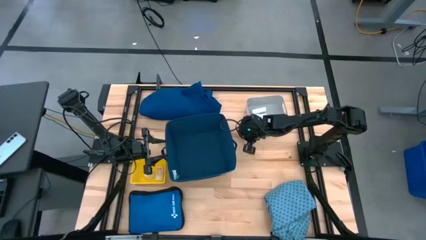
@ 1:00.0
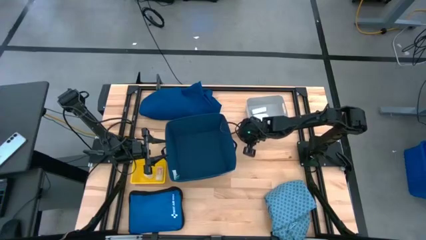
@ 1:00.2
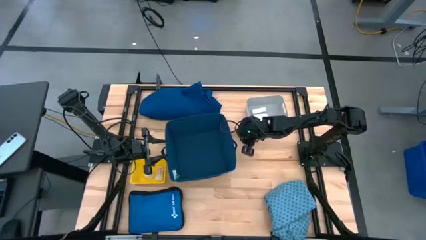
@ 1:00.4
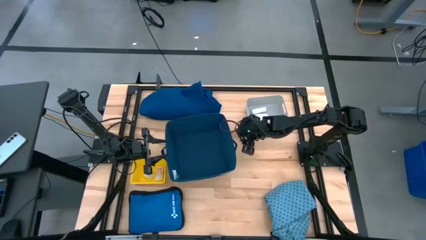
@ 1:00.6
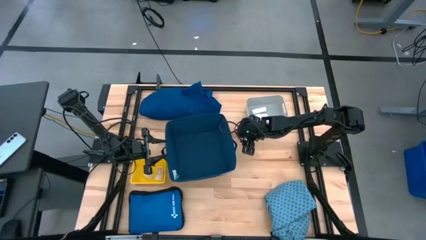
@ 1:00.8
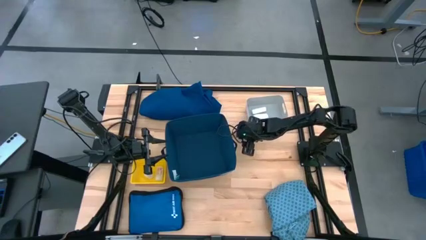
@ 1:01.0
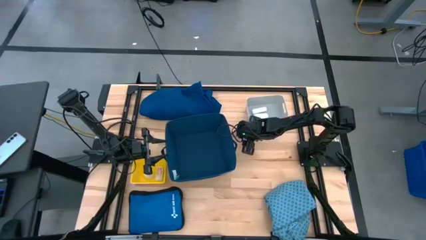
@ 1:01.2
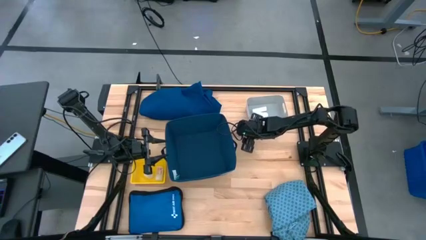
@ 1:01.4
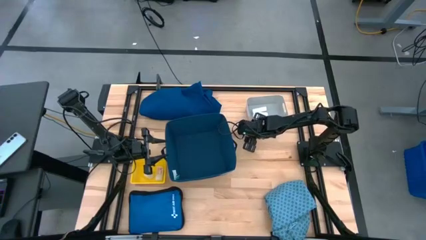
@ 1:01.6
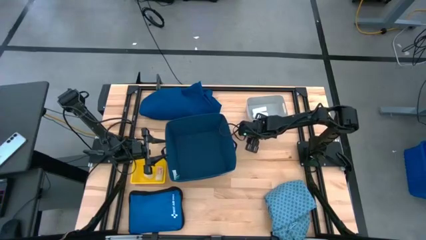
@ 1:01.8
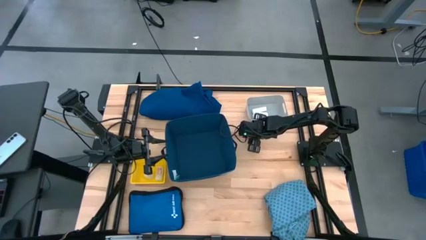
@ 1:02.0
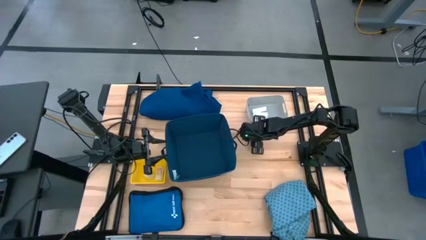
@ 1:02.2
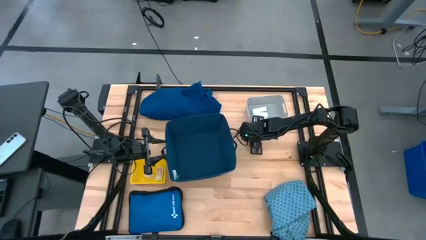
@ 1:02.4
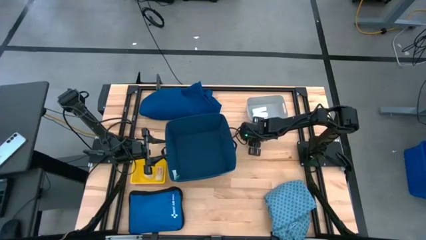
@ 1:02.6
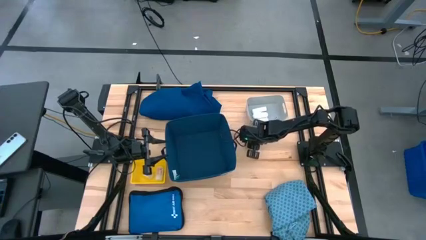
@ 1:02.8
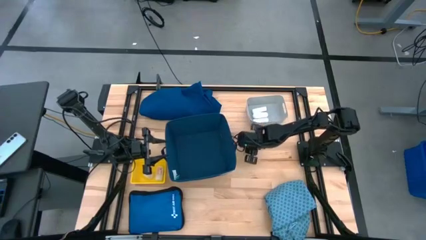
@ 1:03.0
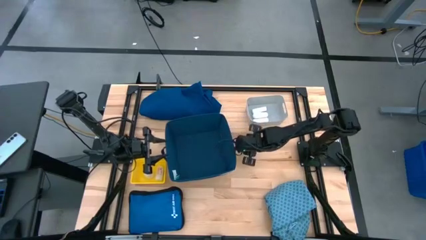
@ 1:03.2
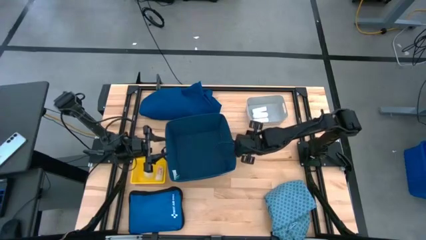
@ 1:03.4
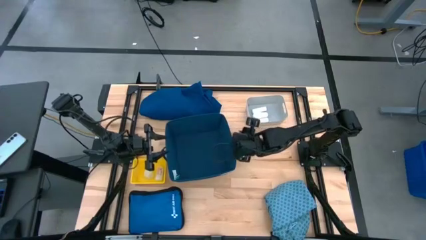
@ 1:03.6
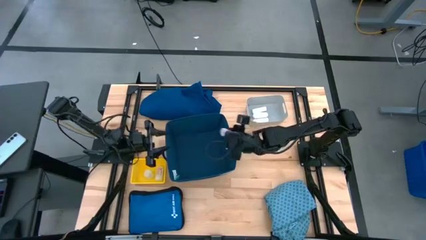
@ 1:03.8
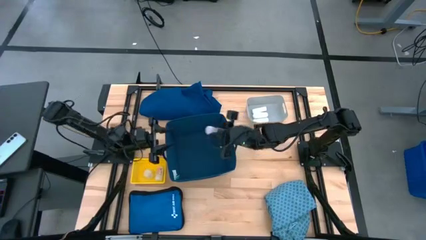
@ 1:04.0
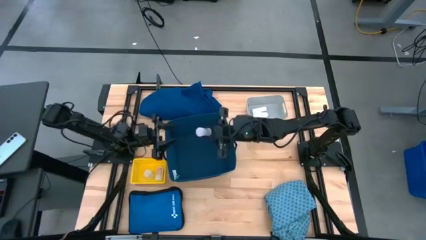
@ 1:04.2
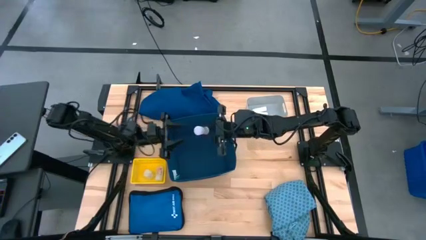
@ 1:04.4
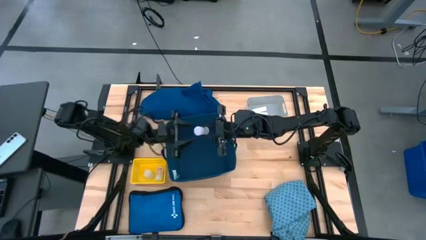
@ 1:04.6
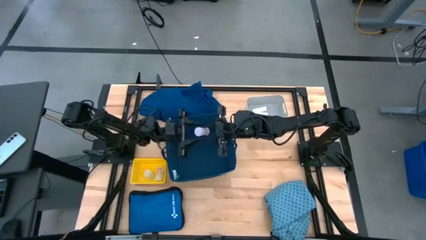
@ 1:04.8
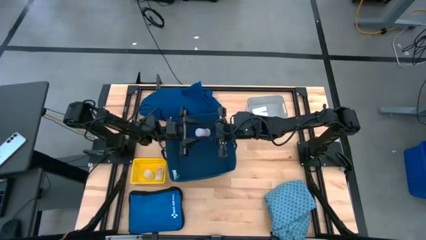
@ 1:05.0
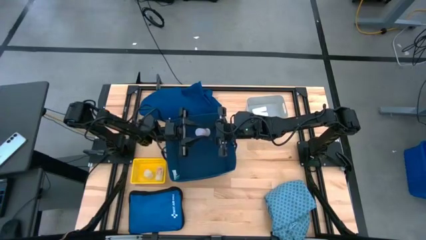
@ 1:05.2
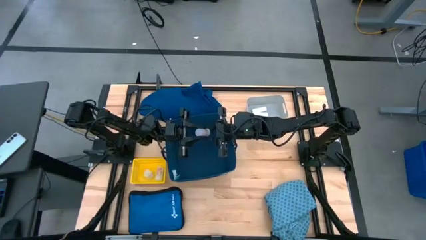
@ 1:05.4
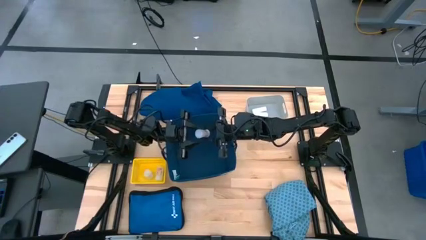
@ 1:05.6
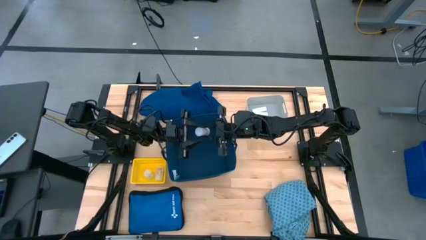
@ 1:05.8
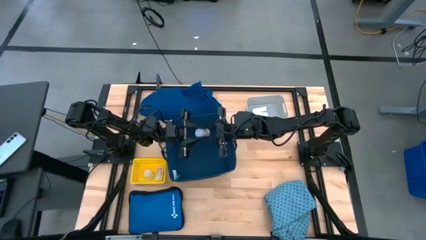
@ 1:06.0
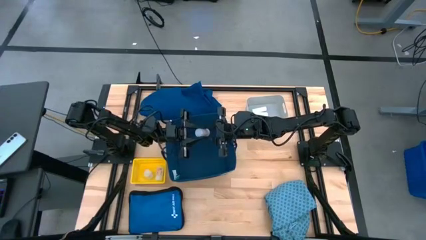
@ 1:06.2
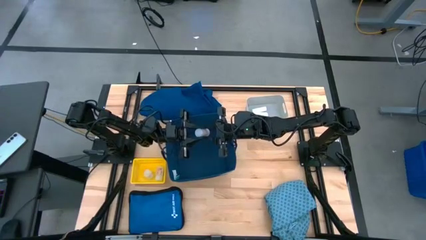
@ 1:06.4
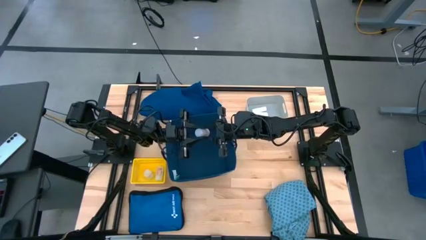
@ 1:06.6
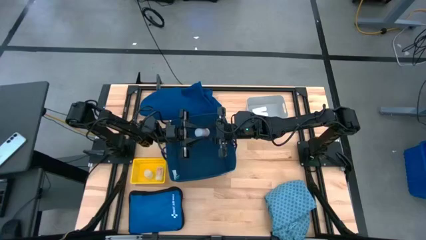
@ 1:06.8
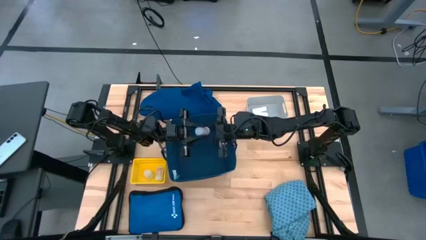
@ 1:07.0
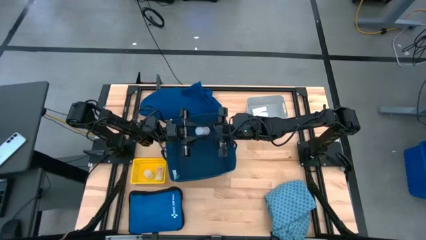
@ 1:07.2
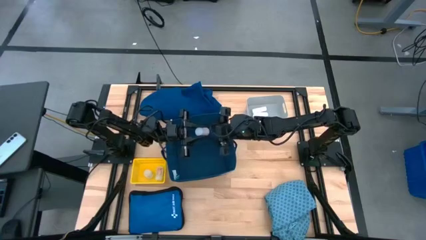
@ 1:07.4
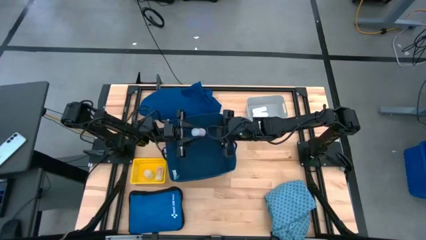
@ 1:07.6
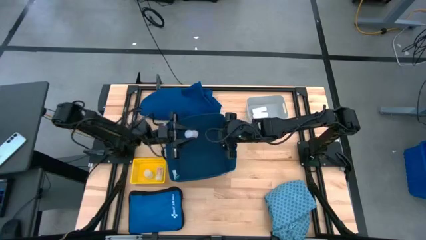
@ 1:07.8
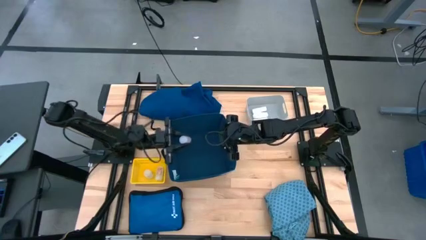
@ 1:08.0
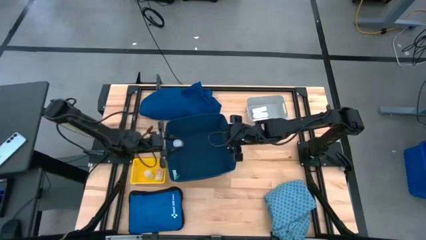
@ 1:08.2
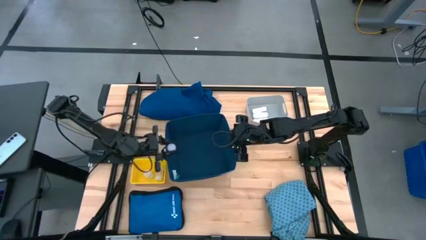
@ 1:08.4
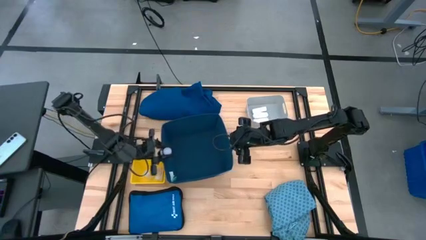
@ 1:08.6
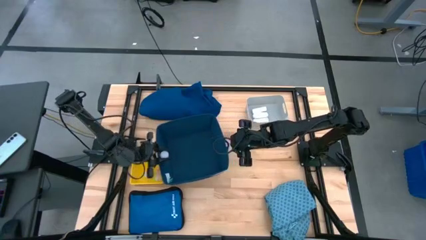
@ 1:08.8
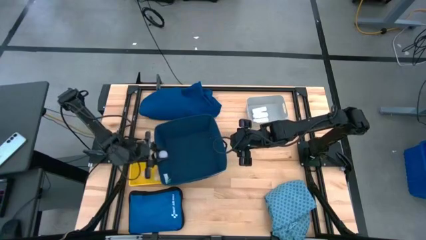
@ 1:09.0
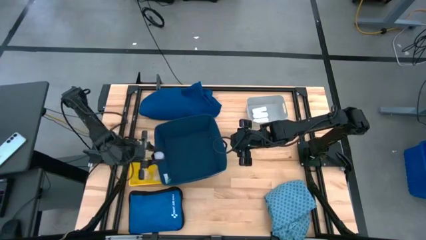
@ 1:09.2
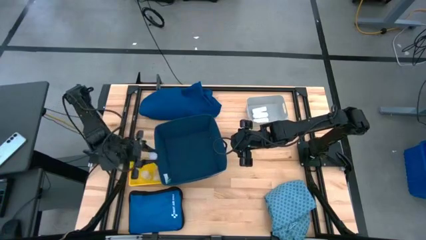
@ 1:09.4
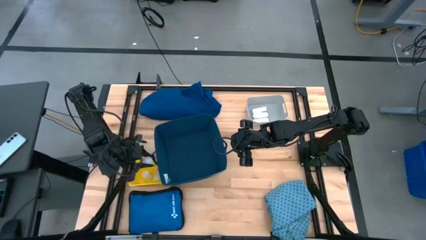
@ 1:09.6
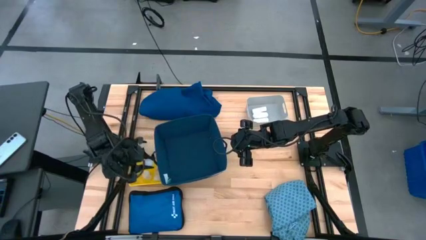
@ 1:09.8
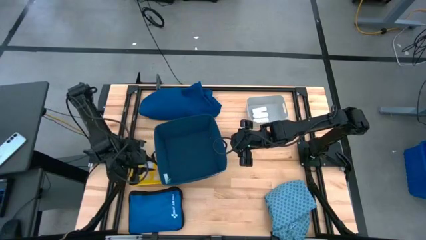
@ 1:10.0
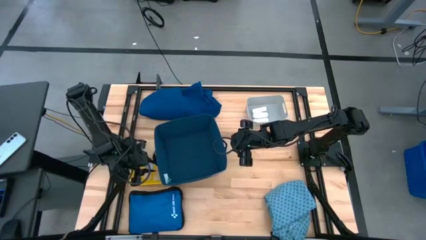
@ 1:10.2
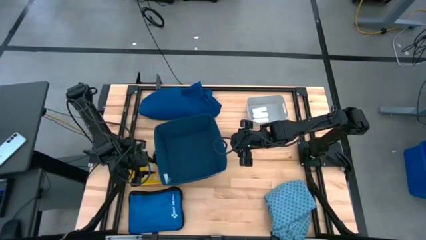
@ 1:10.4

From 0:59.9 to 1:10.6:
Task: Pick & place medical supplies in basket/bin
Put the white medicine bottle into the yellow bin

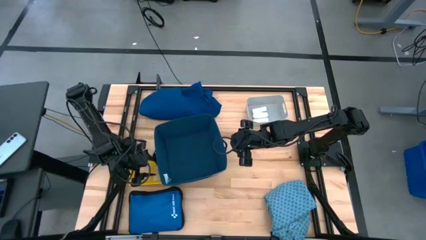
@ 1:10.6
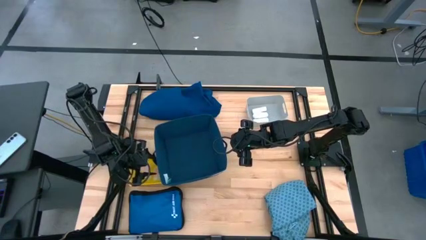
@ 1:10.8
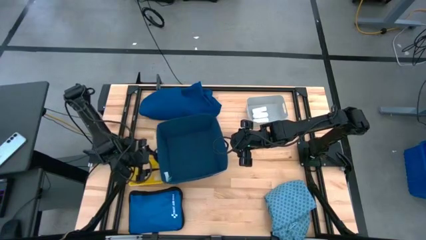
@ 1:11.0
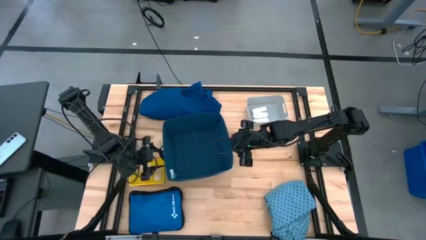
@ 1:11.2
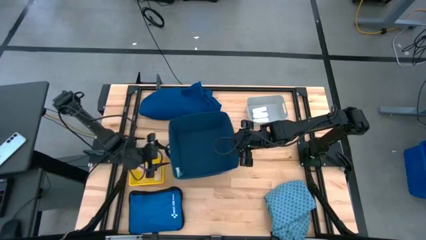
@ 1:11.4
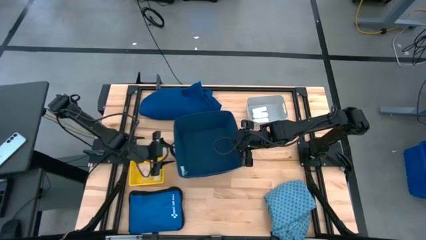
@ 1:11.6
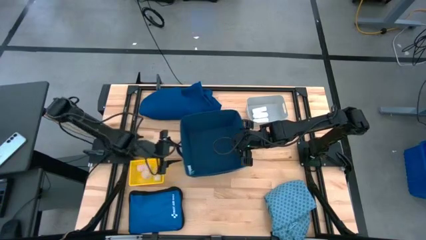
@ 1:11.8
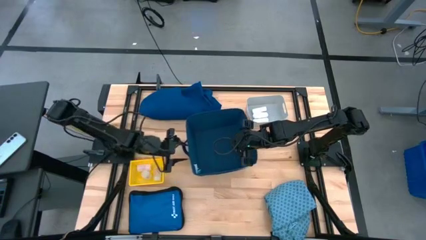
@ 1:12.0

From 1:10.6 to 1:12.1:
Adjust the blue bin

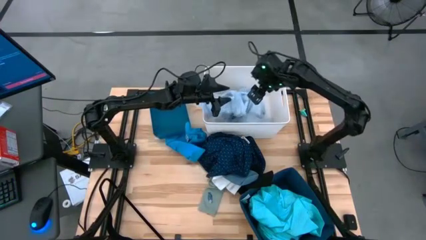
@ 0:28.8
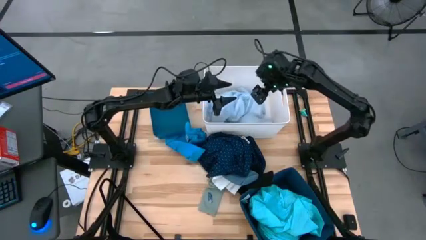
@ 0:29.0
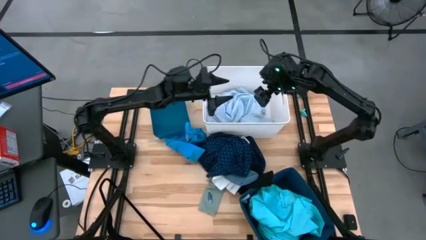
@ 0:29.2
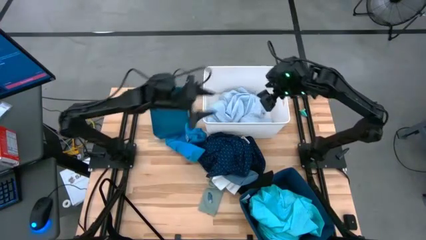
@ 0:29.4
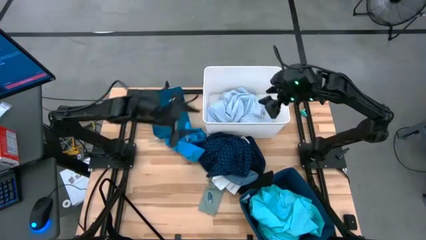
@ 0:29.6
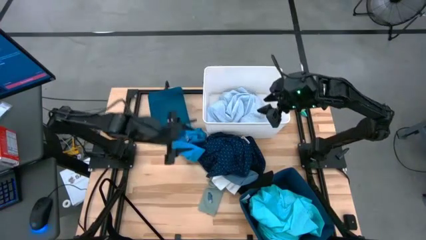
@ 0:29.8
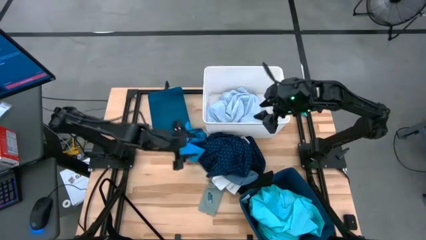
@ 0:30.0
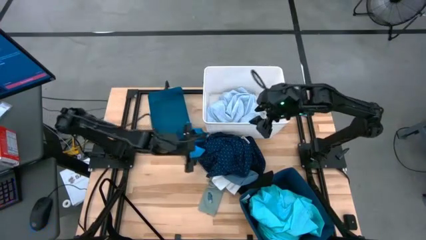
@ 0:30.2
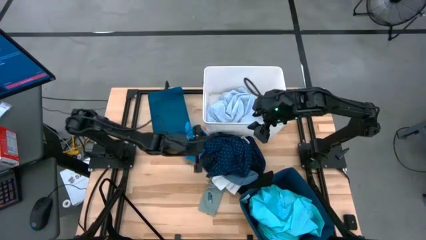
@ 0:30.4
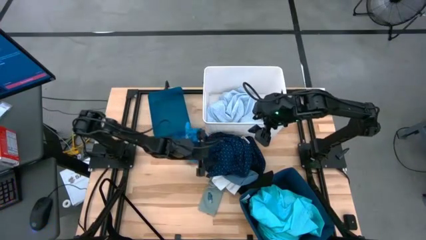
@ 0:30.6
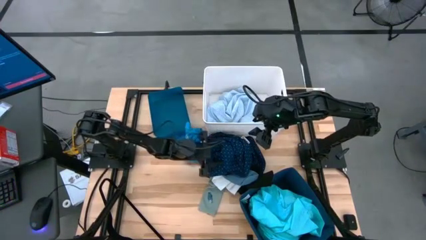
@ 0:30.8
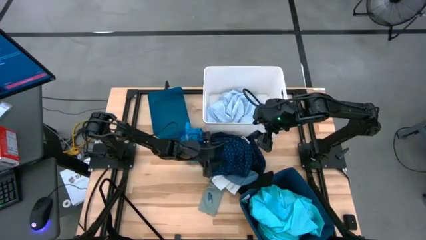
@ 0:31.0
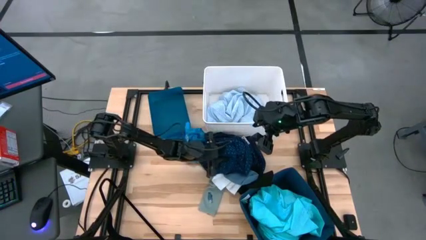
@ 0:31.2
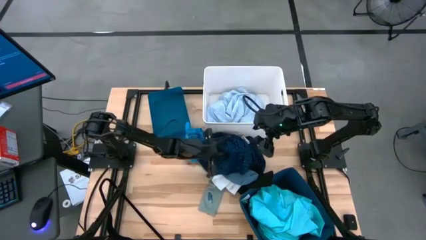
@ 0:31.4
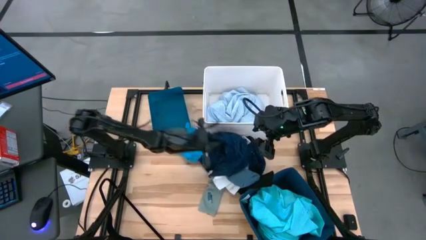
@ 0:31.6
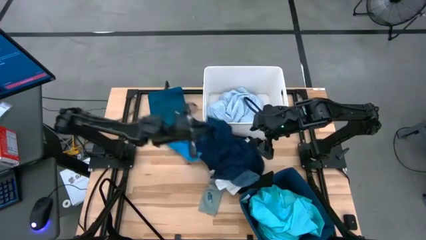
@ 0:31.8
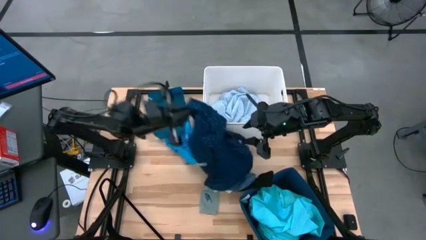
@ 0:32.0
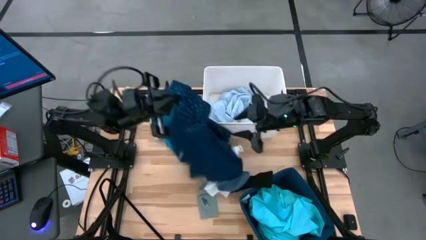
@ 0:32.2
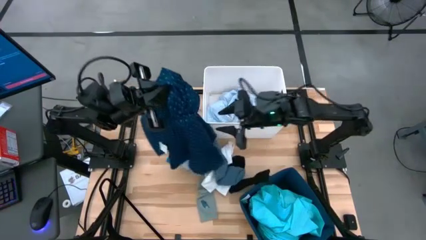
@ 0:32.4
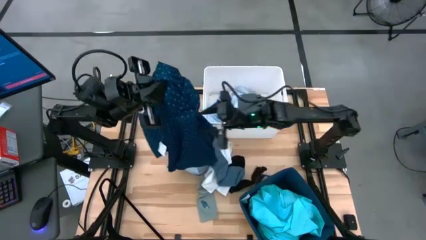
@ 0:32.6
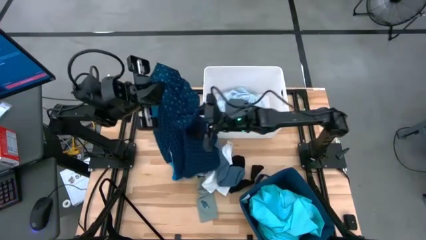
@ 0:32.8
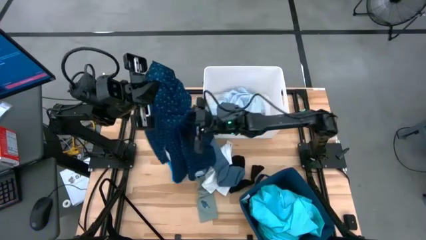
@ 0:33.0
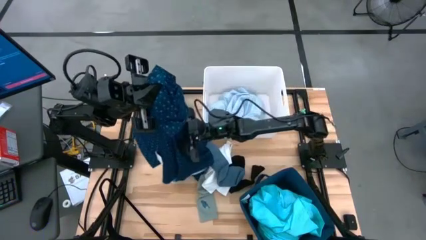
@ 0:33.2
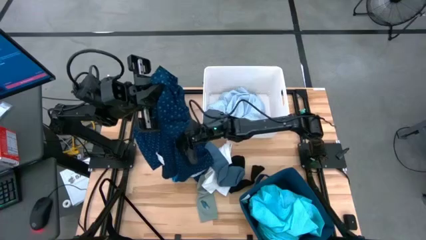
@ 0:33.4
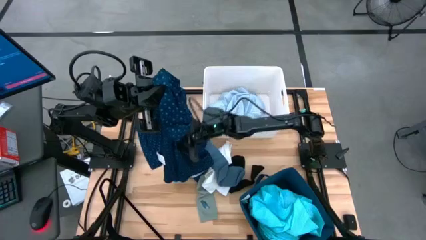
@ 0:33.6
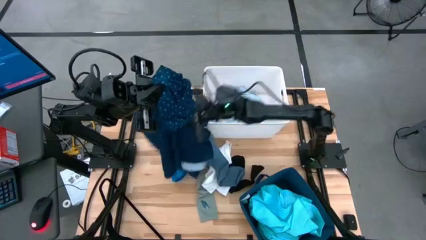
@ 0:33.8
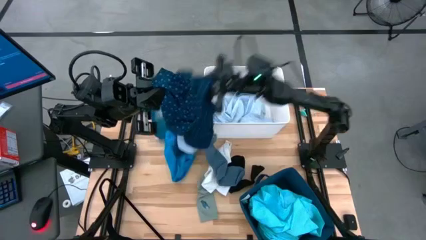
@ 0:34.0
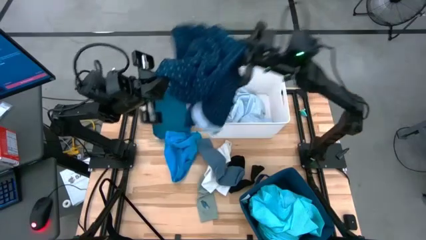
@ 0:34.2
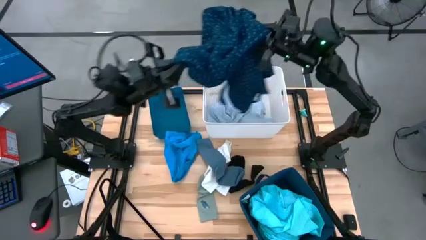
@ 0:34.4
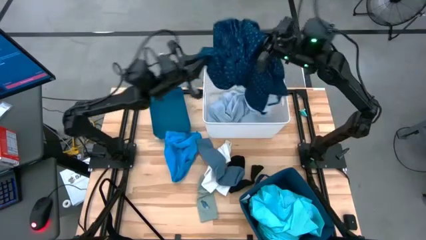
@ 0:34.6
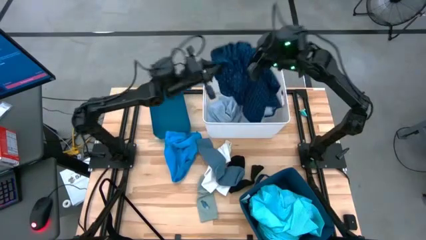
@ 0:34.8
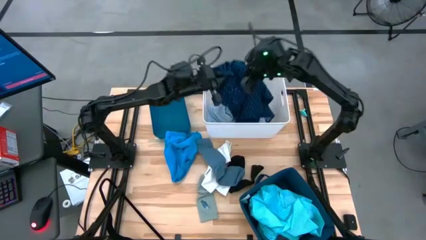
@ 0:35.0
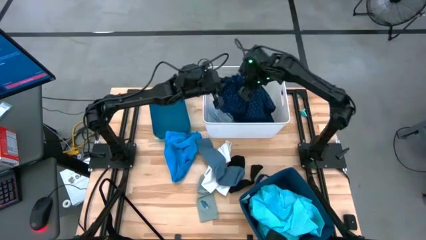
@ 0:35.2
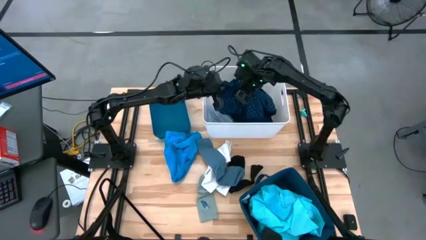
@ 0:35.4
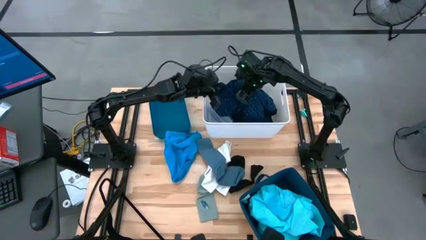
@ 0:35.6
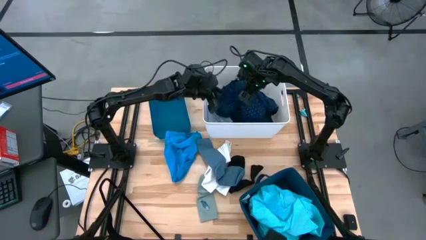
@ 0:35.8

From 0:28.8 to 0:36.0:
Task: Pick & Place Cloths
Put the blue polo shirt into the white bin
